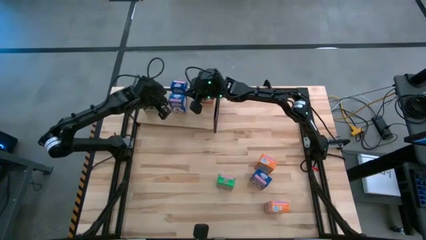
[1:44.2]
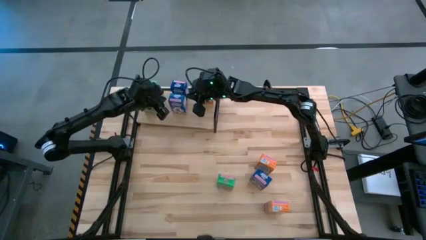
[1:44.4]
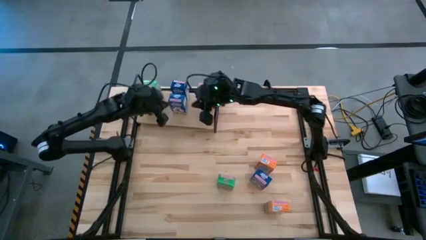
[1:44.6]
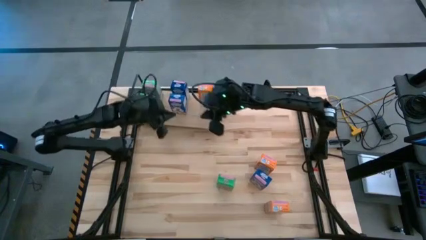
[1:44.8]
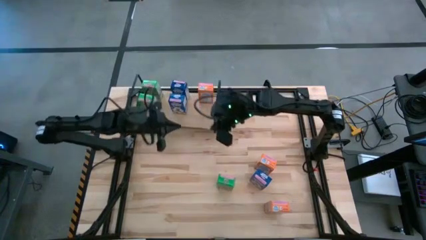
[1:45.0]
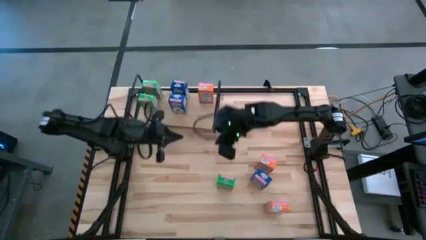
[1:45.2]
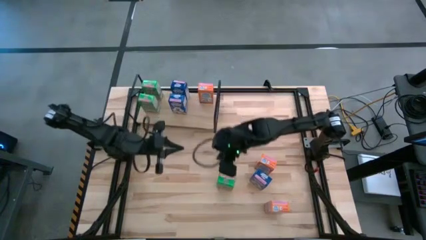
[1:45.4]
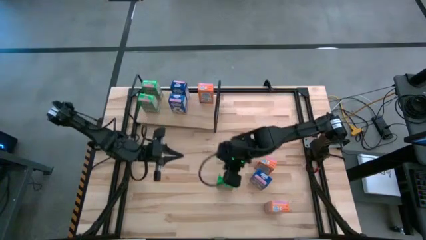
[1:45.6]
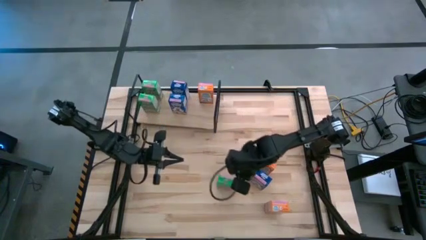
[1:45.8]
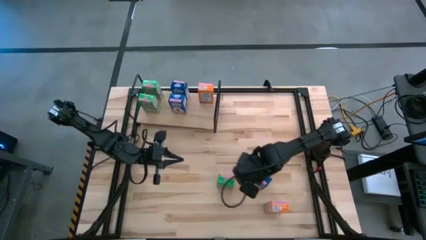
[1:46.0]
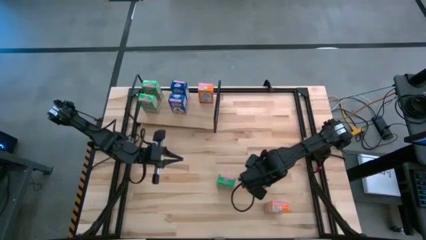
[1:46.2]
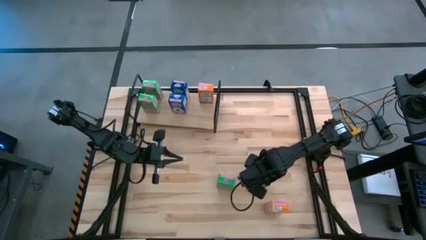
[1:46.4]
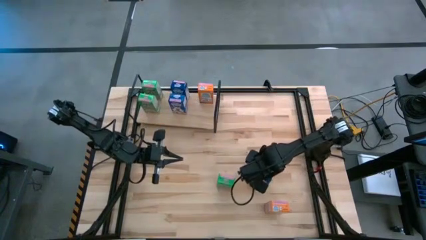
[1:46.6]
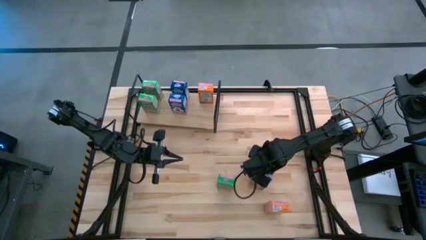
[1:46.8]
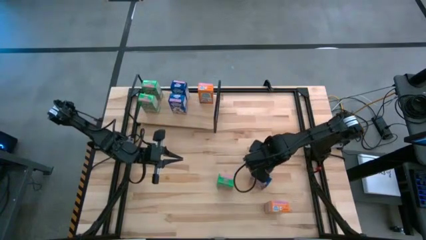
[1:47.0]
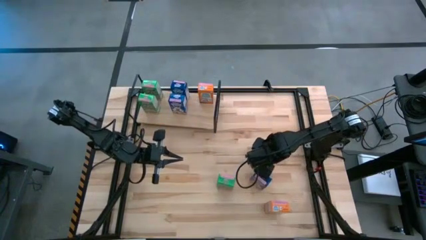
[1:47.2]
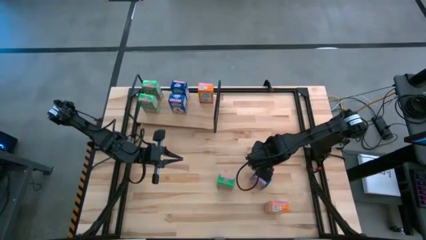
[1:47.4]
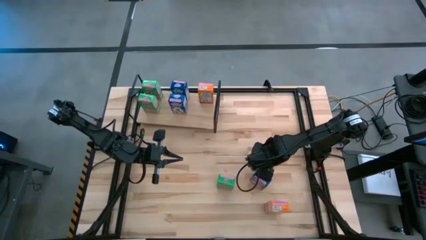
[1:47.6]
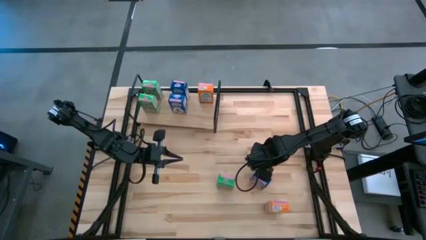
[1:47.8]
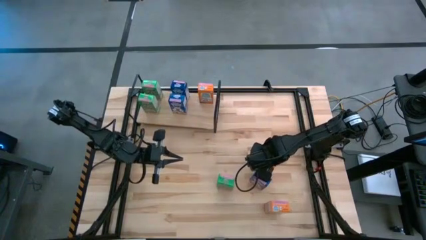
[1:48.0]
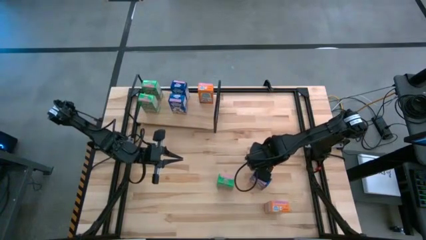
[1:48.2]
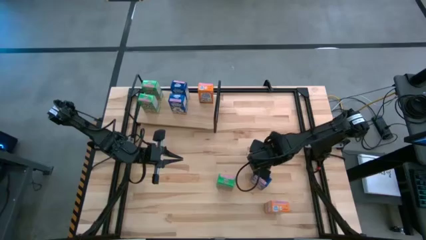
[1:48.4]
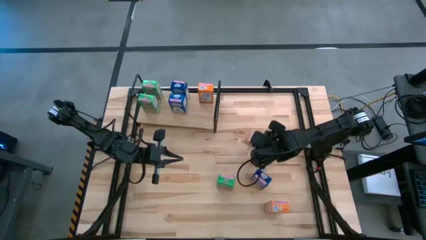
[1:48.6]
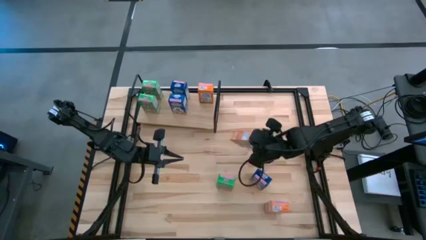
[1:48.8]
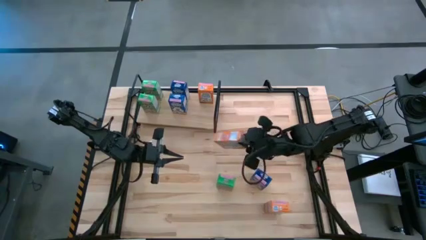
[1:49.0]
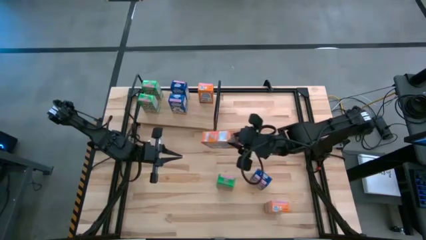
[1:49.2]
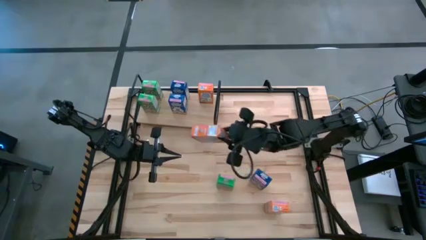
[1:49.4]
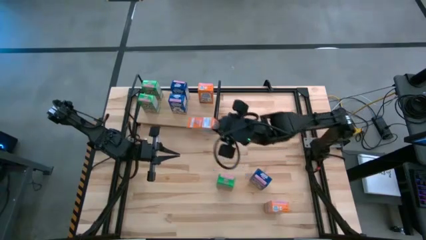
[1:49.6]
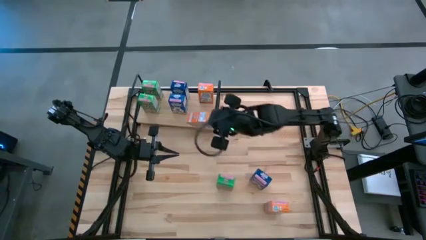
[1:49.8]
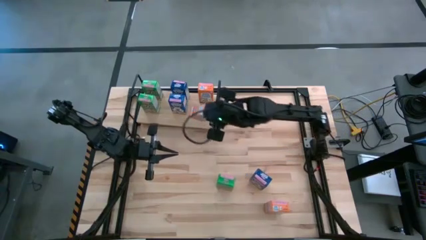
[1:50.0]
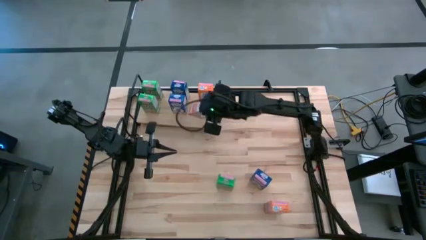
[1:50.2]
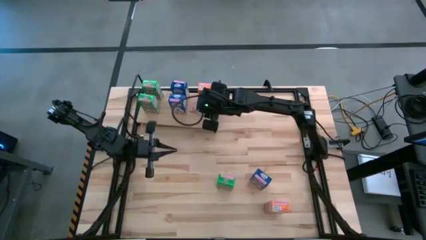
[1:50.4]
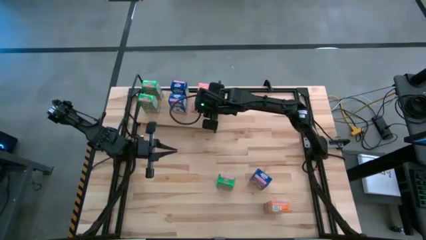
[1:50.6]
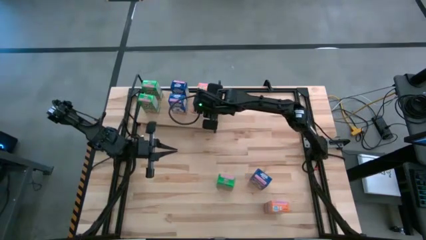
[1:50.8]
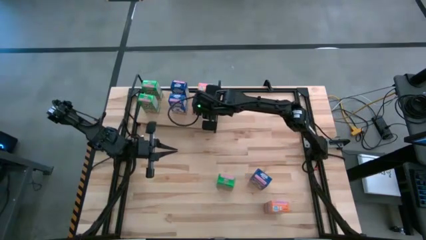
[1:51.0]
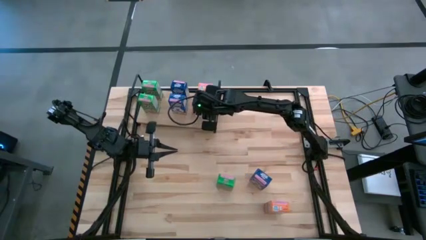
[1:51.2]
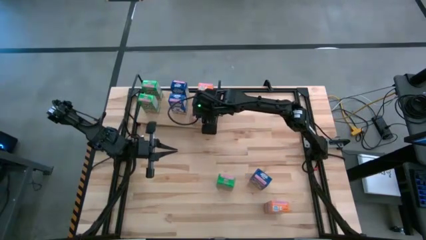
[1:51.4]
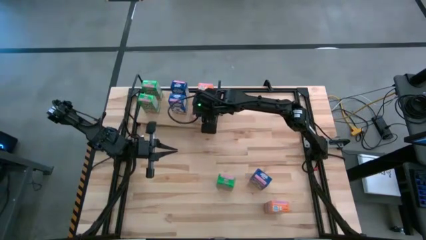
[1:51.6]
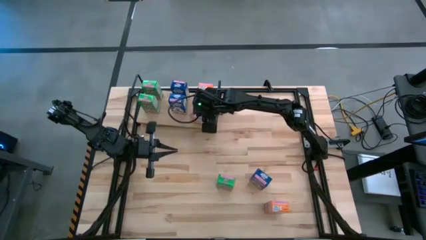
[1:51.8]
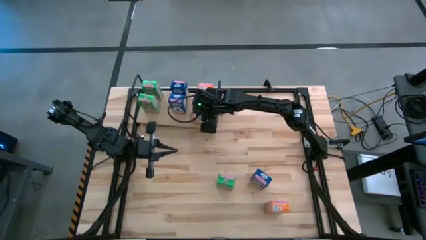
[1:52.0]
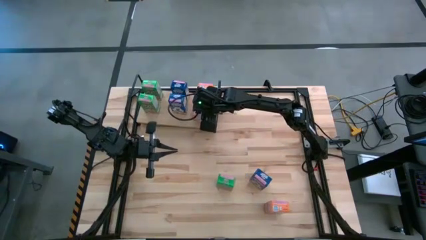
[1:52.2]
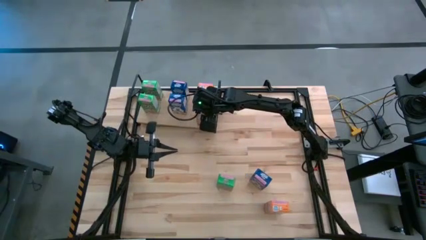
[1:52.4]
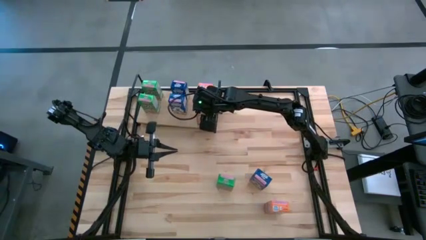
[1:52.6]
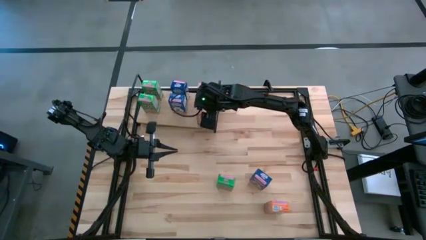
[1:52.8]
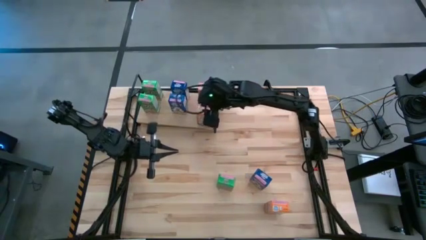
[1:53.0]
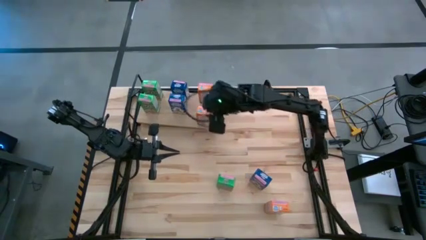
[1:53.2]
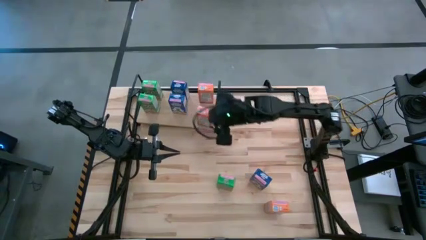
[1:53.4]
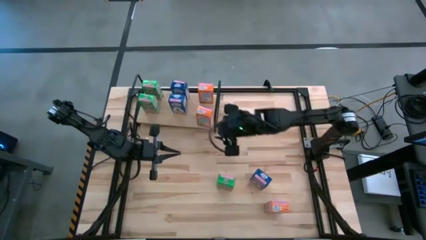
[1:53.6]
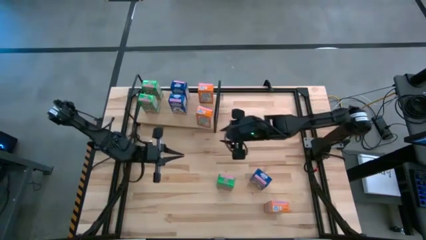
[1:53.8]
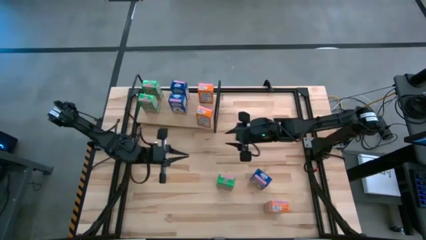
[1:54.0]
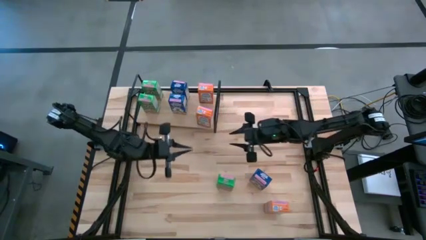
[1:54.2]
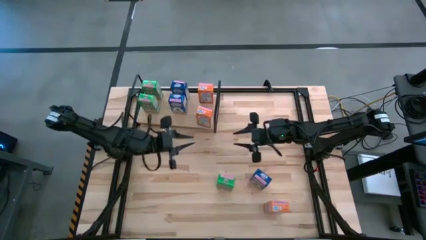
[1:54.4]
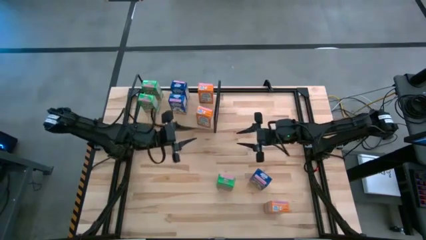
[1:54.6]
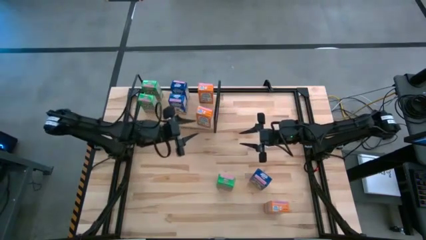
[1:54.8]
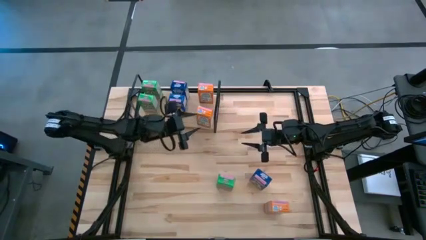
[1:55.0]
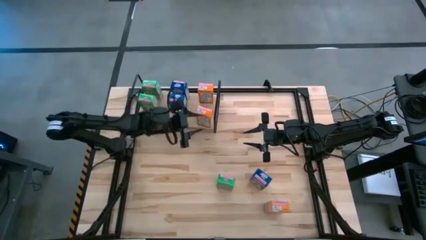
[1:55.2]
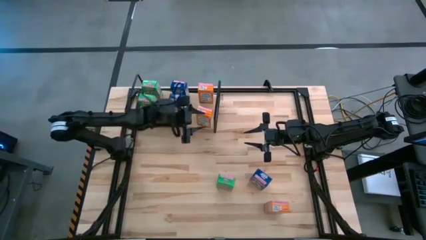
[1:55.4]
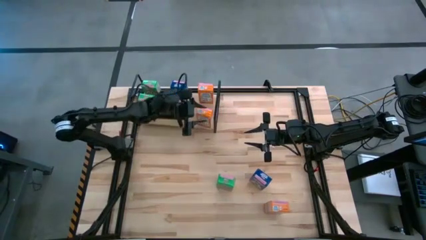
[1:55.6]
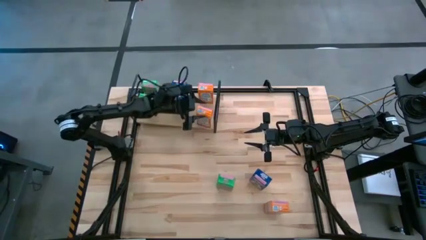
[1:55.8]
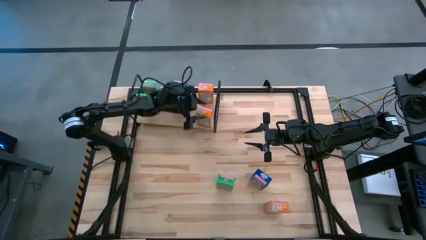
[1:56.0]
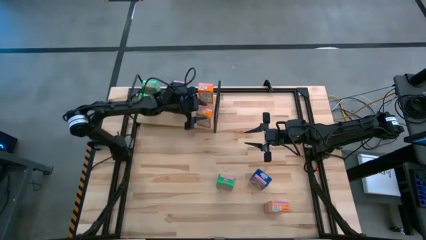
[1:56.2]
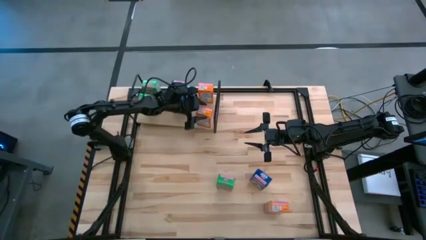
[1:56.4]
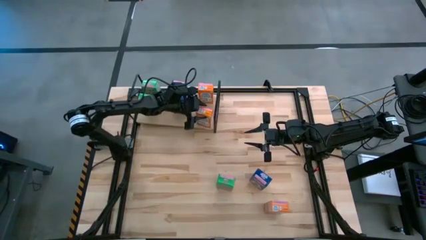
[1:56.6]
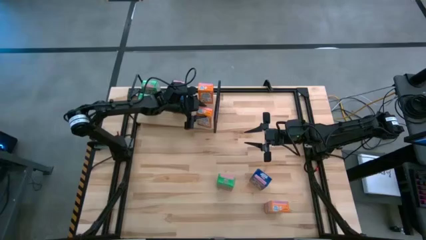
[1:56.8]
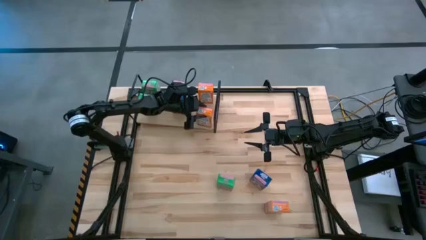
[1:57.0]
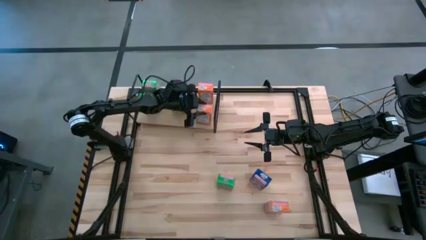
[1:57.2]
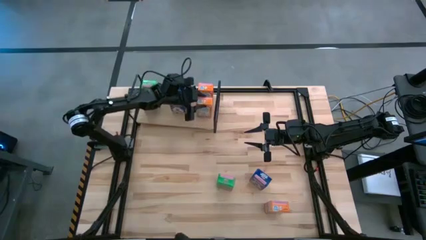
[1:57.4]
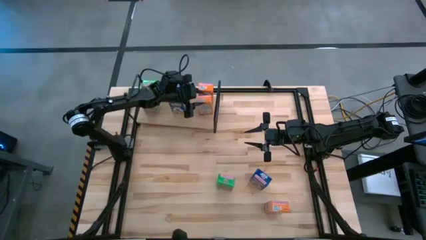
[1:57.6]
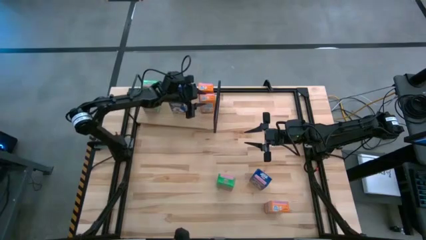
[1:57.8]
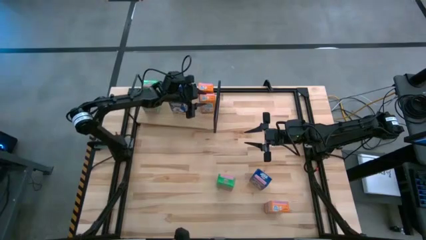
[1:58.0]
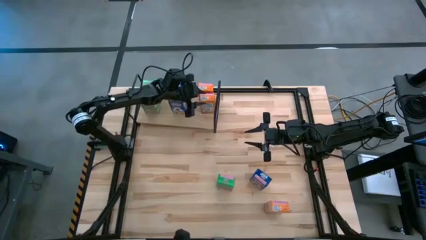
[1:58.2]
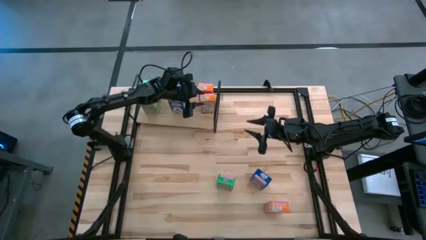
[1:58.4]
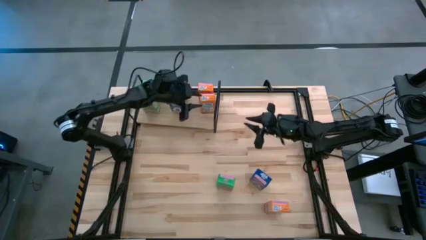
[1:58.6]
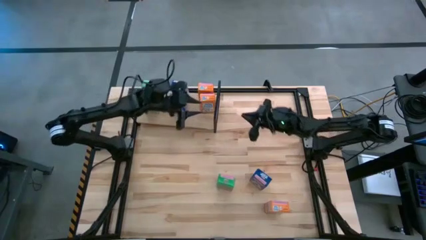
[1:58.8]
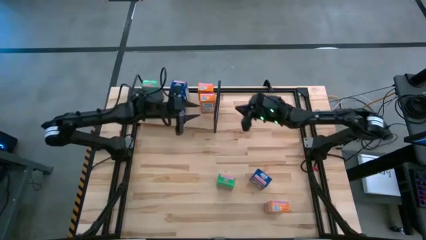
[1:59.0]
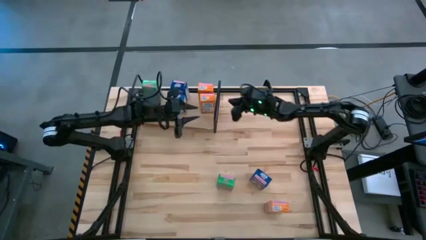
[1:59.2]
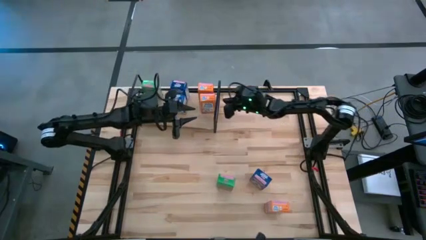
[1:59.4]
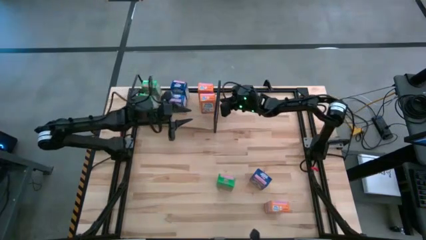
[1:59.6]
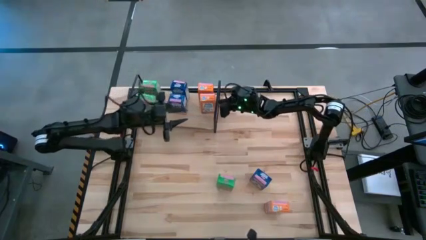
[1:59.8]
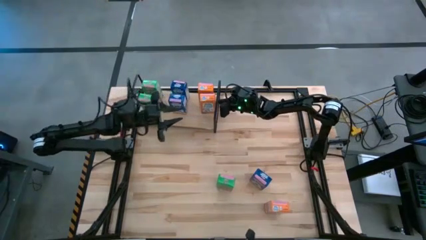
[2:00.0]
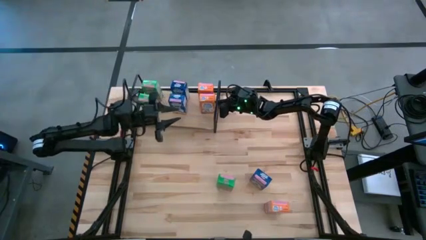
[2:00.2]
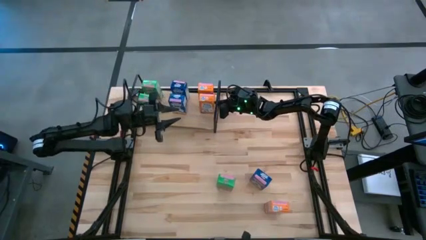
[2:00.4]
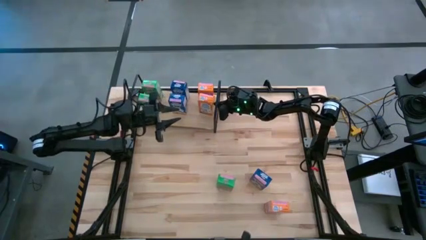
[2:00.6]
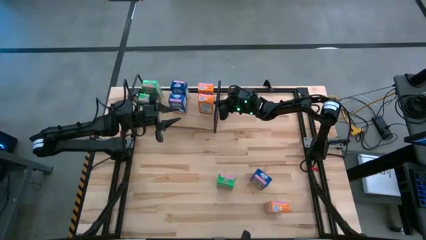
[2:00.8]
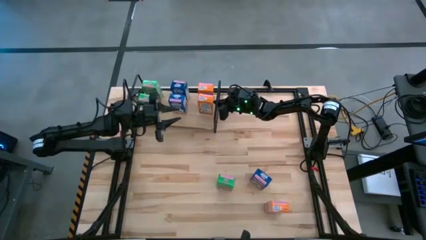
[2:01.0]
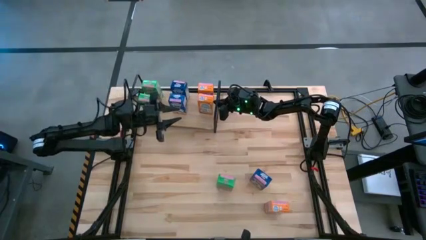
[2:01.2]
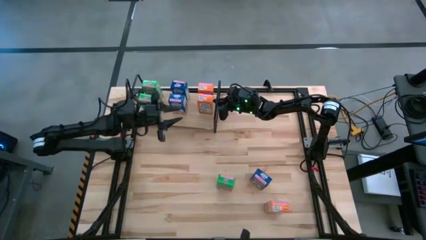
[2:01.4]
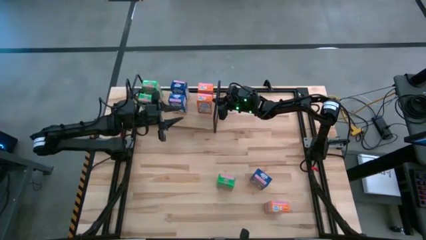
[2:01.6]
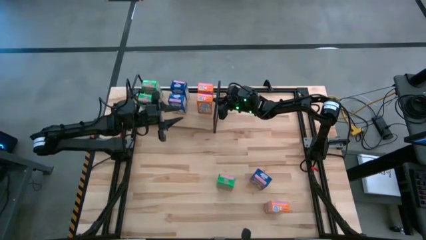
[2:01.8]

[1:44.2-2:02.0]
Task: Stack cereal on shelf
Put the top orange cereal box on the shelf aligned with the orange cereal box
